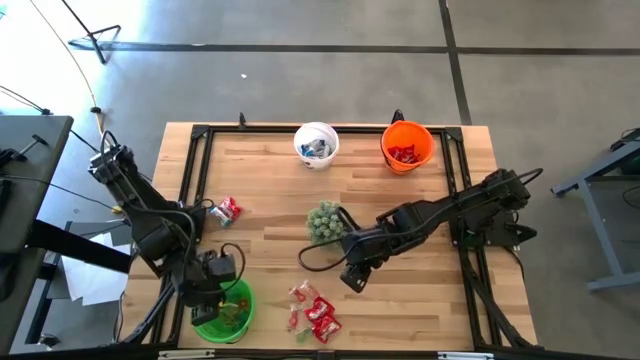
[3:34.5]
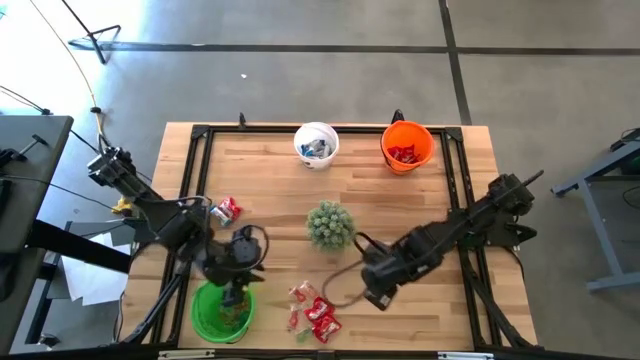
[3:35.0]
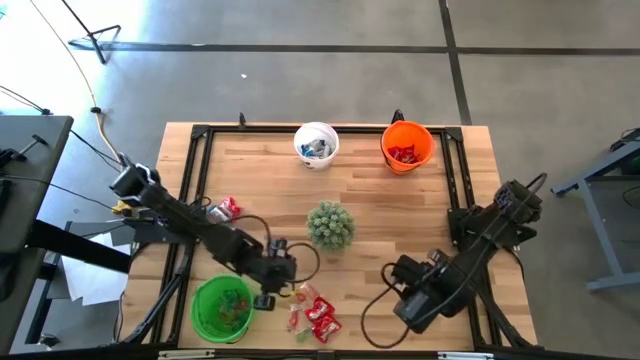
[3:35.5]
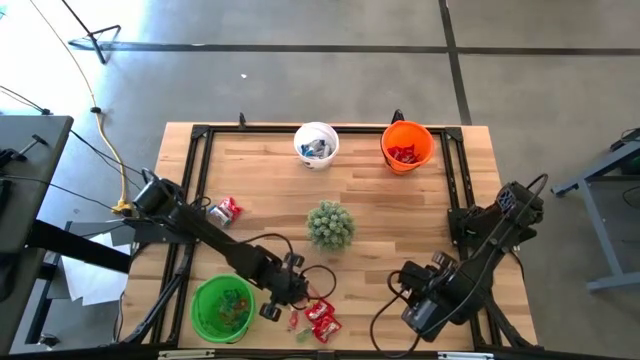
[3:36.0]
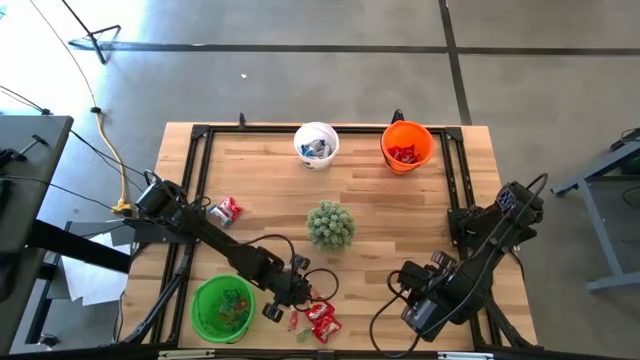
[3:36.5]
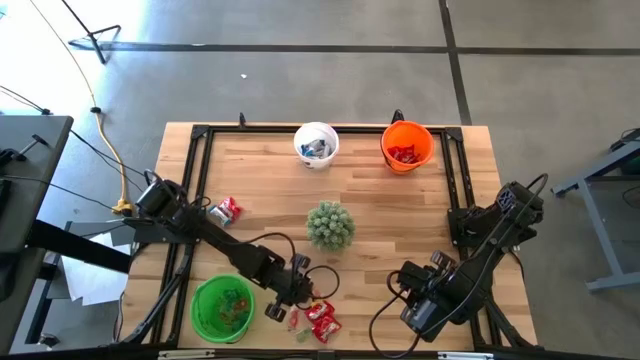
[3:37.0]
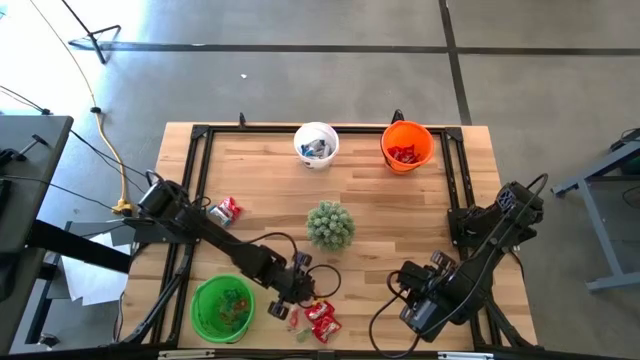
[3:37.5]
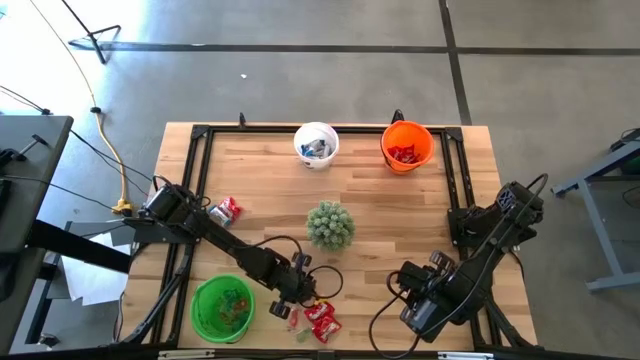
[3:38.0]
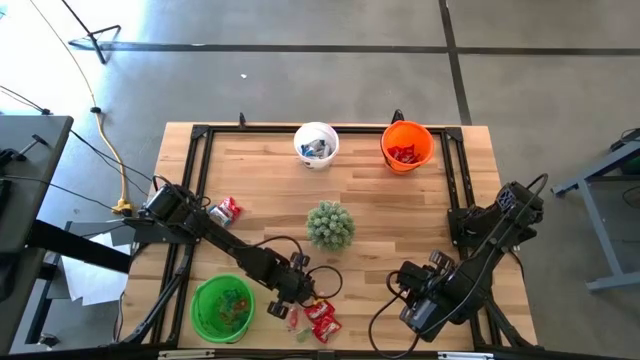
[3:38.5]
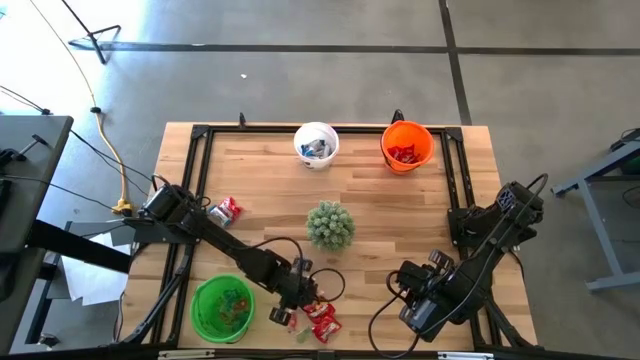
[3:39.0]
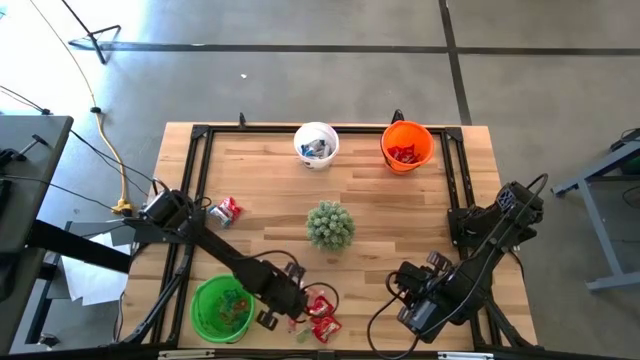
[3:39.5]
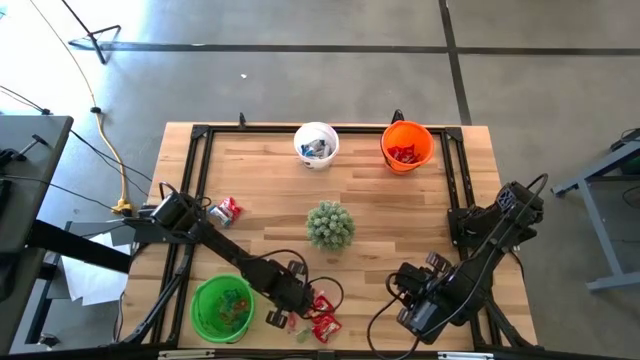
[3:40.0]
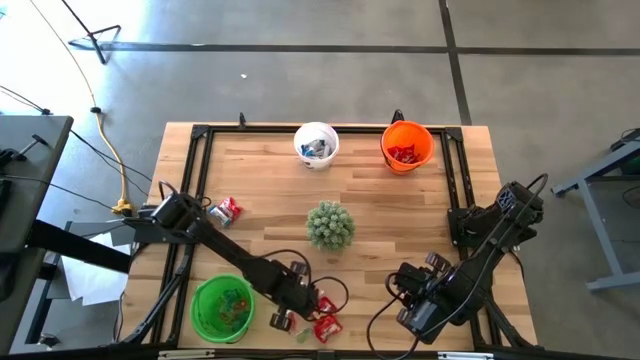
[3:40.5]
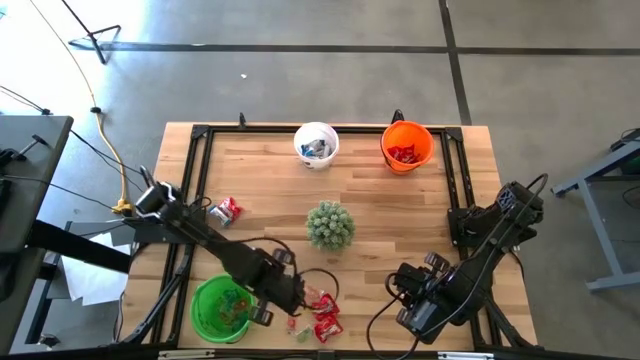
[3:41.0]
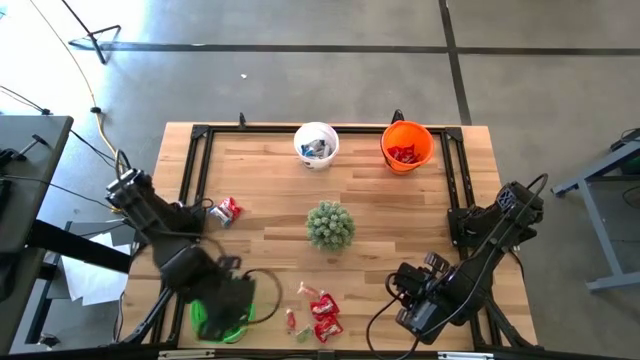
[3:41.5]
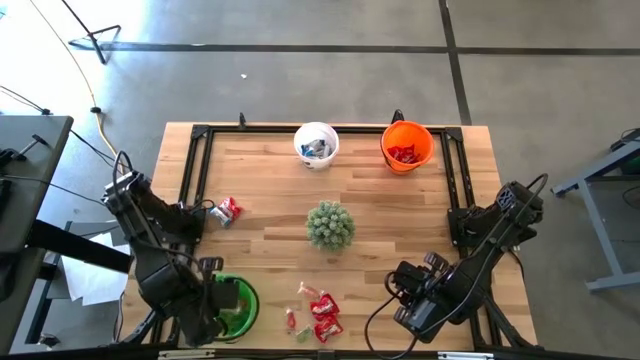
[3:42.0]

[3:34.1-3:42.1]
Task: Sort candy
Put the red gummy into the green bucket

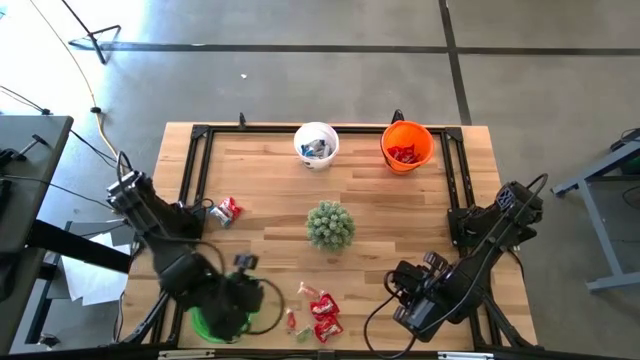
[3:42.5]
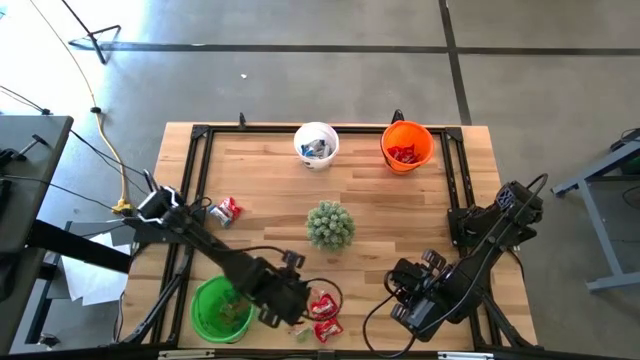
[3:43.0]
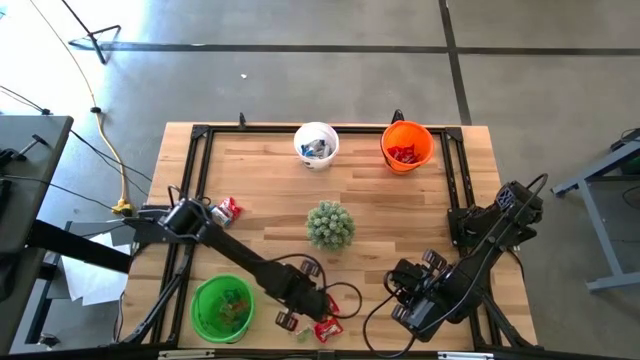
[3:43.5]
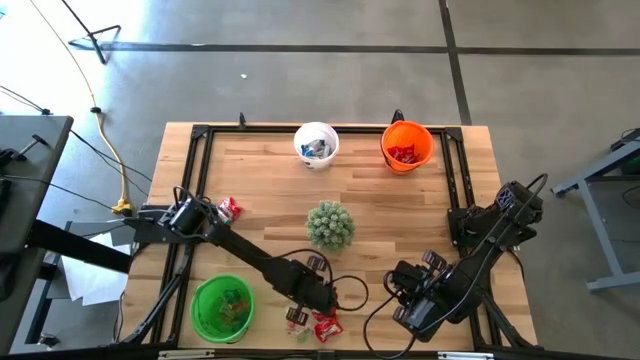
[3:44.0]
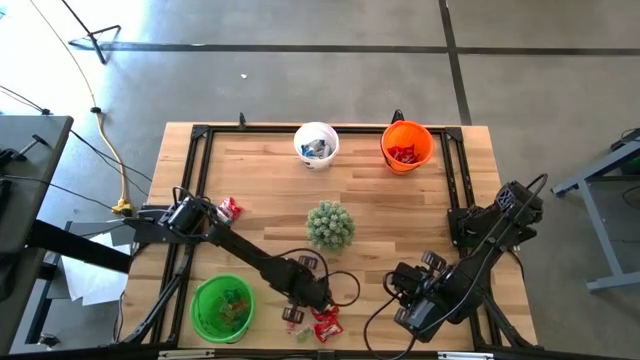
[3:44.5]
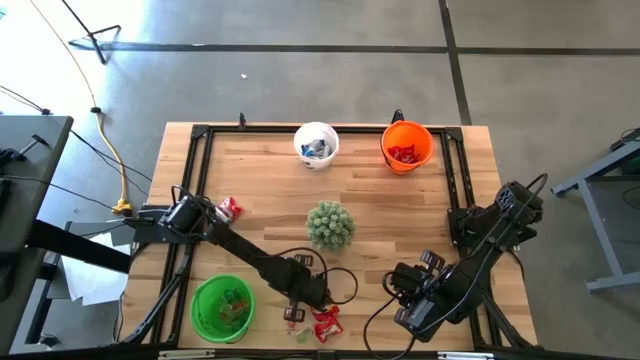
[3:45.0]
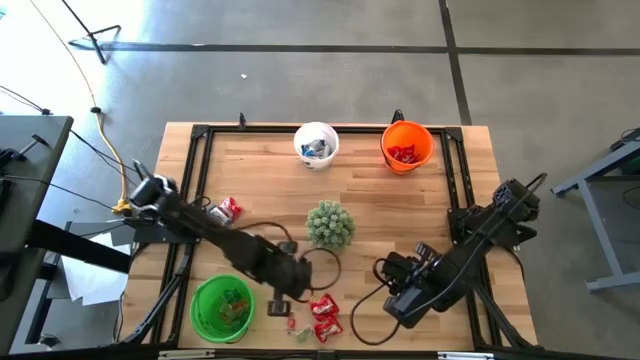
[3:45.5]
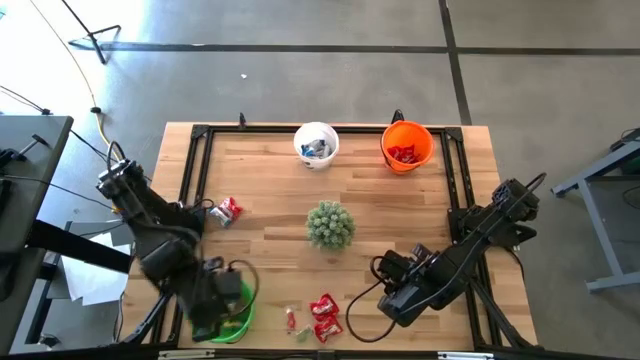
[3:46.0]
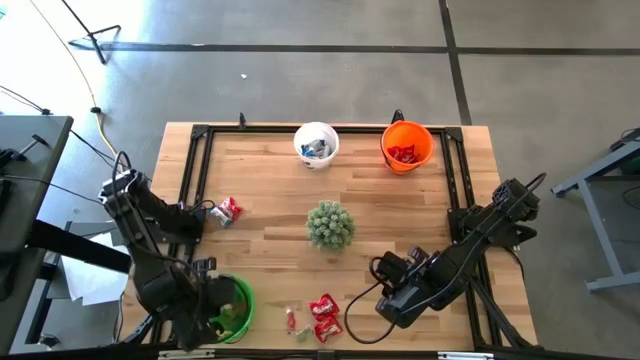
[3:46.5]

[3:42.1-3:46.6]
Put the orange gummy into the green bucket

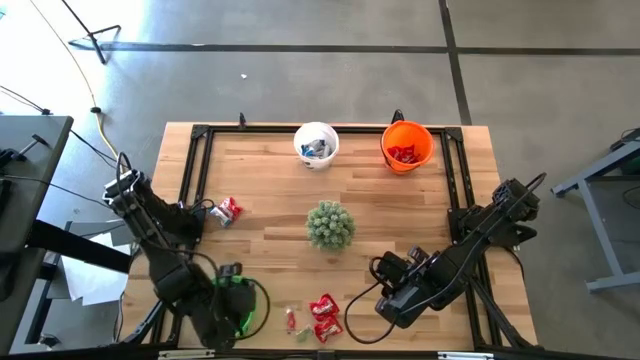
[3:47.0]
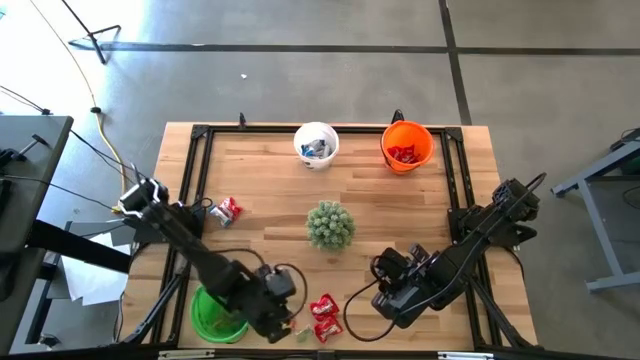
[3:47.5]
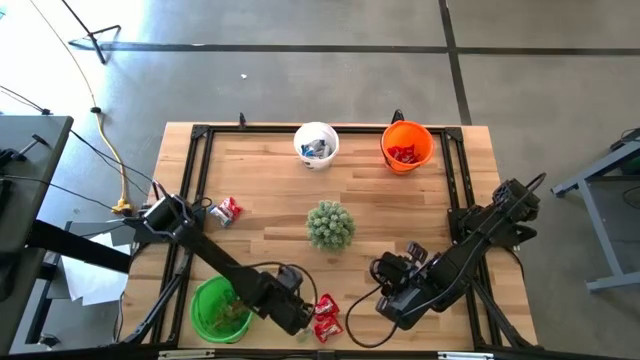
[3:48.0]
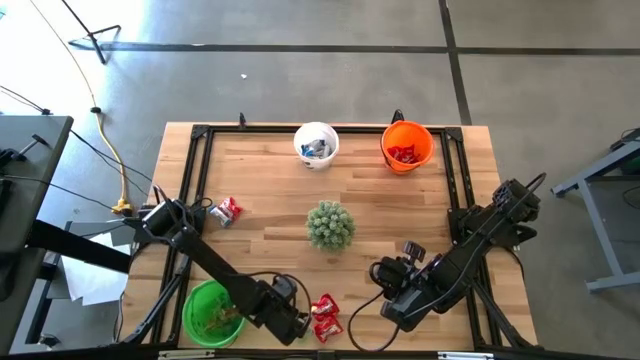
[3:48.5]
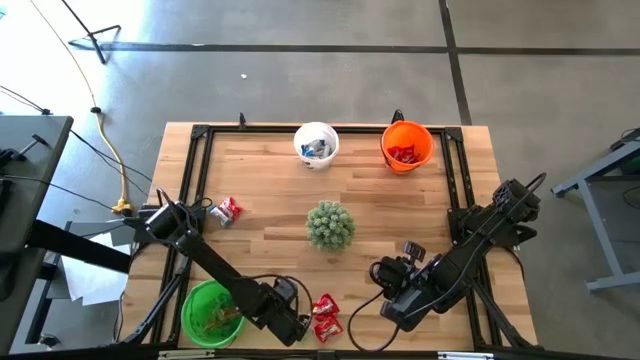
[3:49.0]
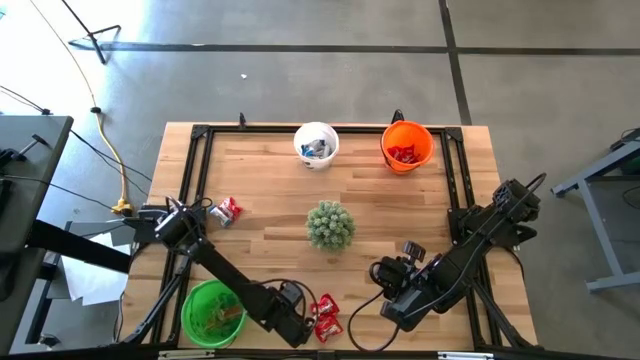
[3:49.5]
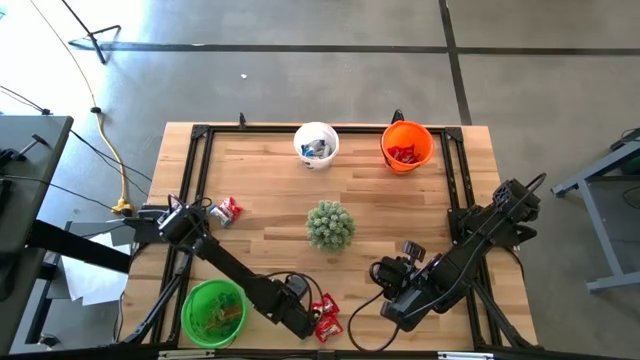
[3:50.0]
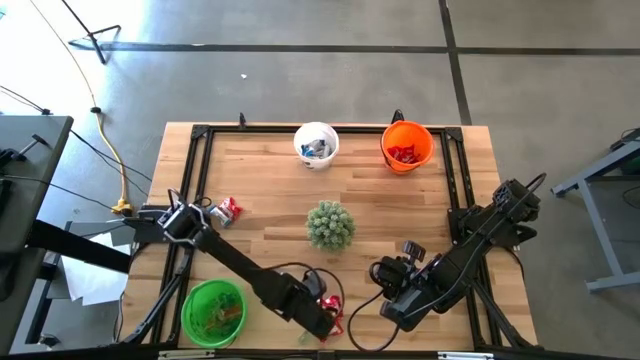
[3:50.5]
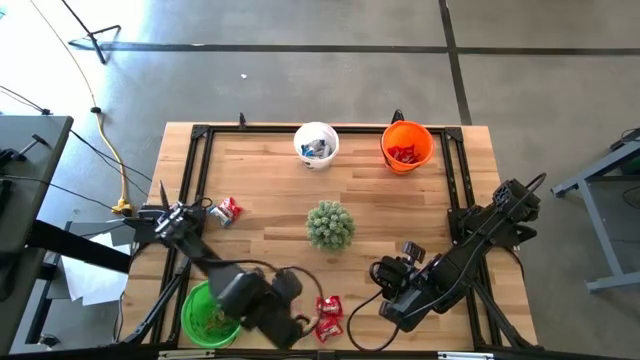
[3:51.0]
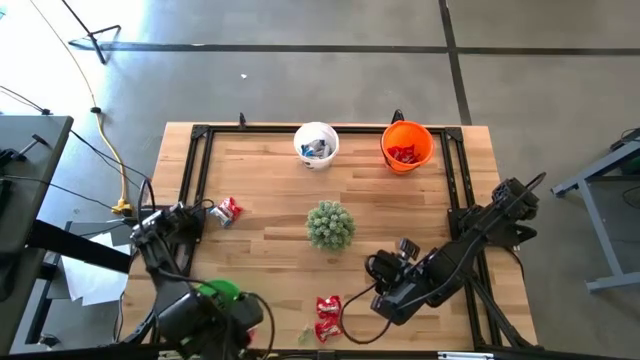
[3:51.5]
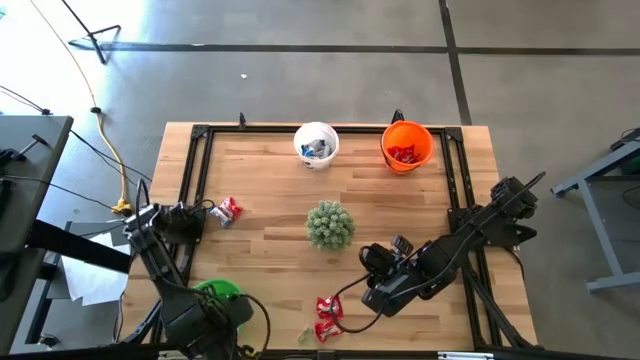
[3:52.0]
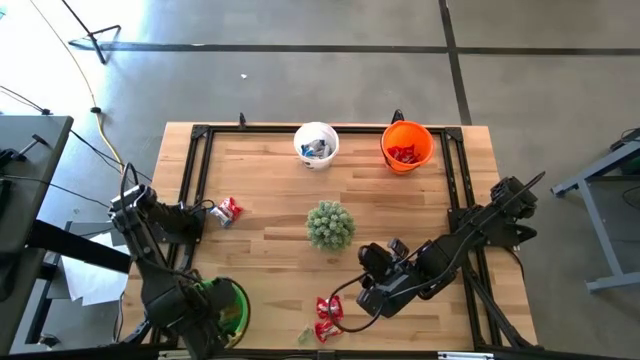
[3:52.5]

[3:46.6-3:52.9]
Put the red gummy into the green bucket

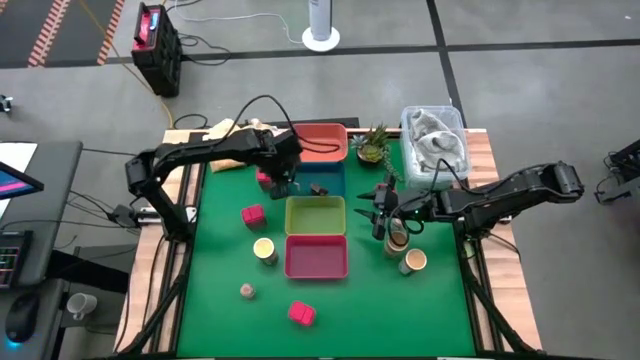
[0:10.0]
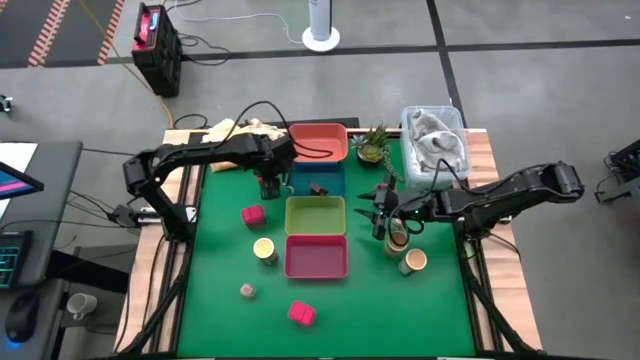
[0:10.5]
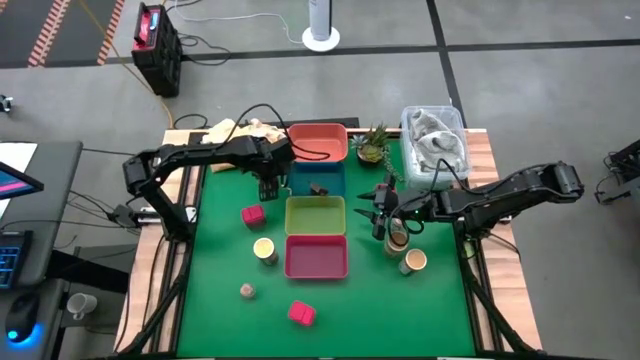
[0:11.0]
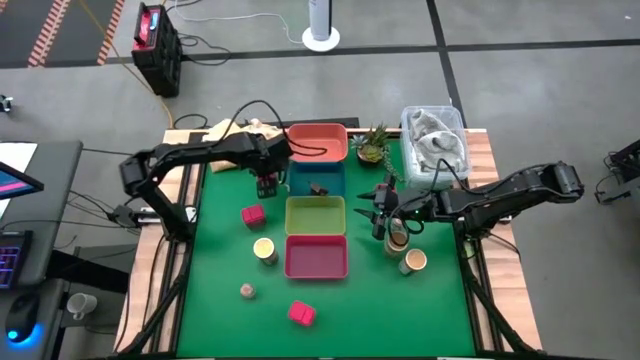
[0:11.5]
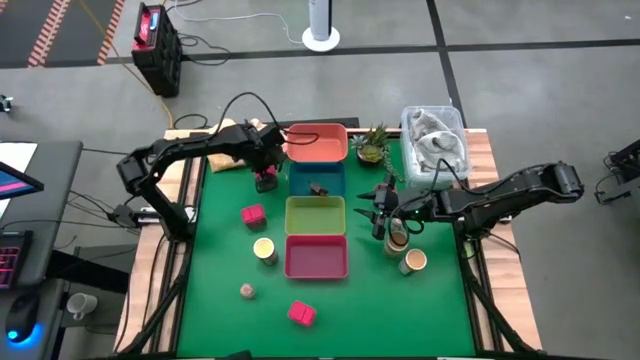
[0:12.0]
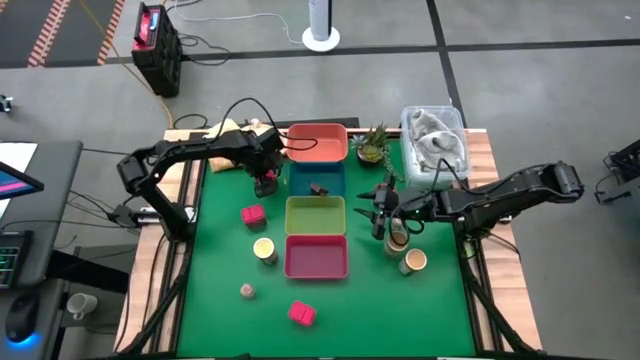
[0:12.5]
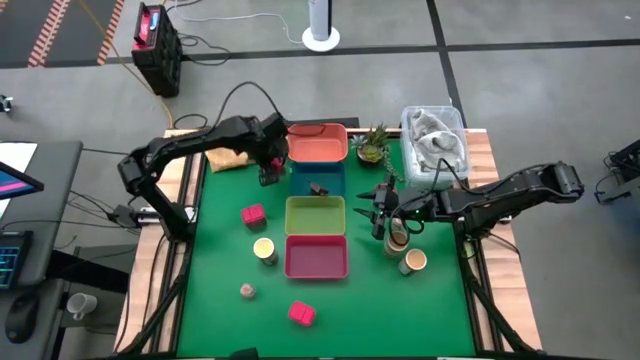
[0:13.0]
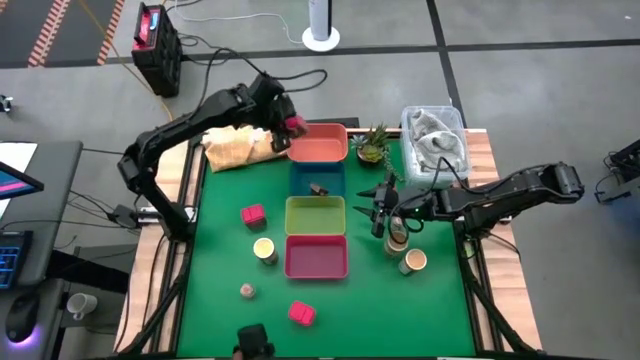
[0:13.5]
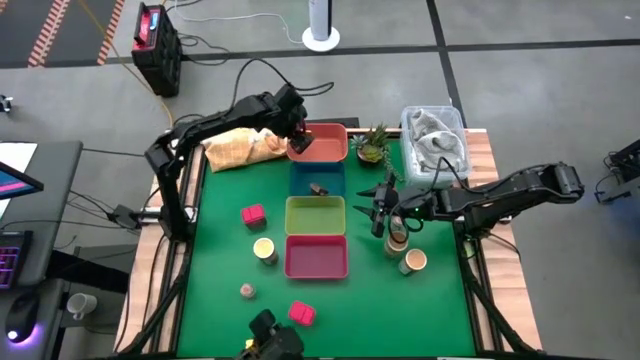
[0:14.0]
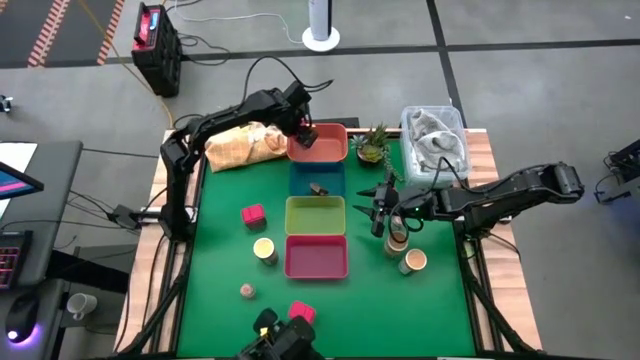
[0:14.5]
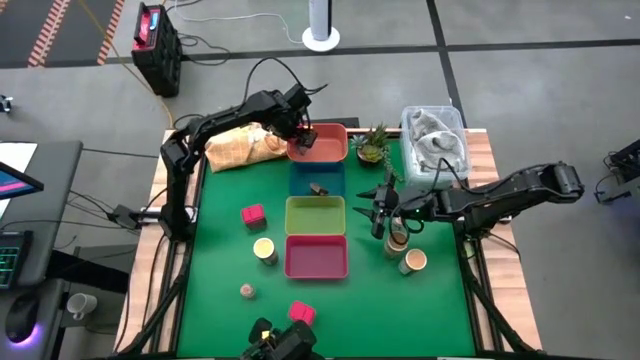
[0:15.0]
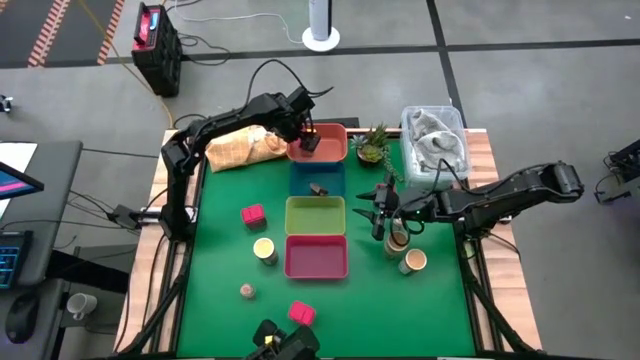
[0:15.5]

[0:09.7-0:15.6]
Task: Sort spices by type
Put the top left red seasoning can into the orange bin
